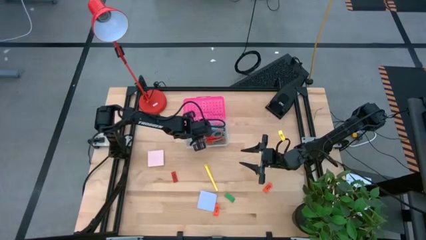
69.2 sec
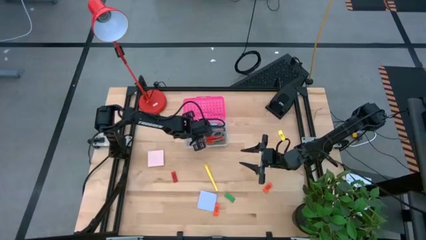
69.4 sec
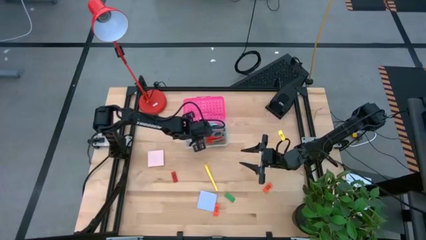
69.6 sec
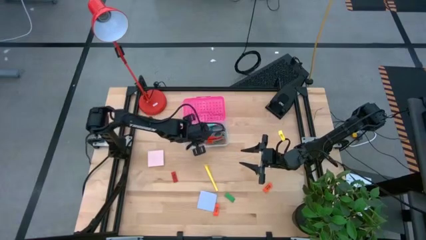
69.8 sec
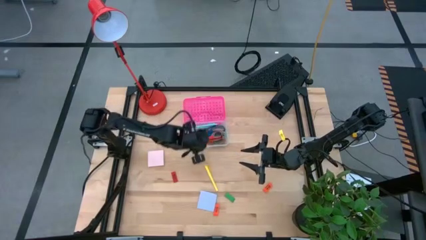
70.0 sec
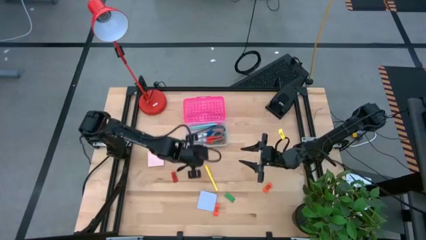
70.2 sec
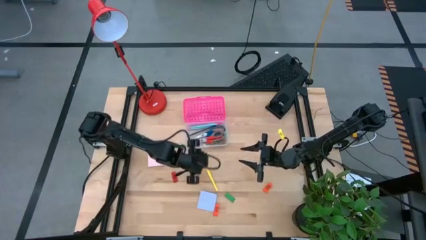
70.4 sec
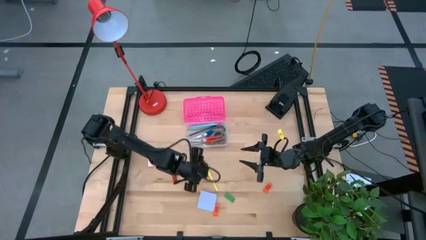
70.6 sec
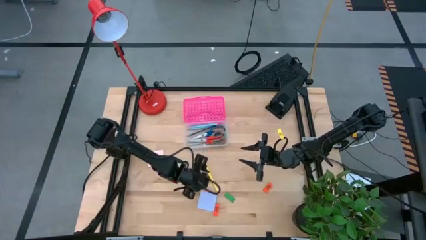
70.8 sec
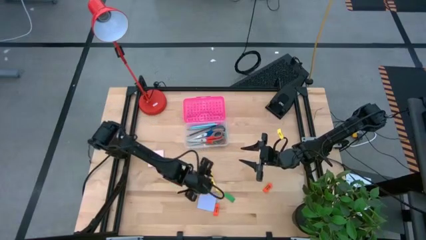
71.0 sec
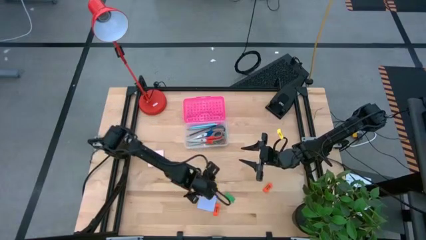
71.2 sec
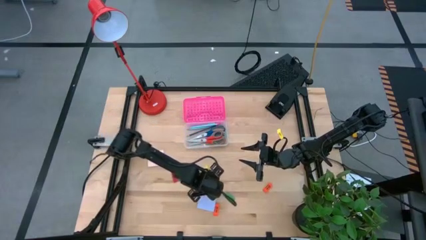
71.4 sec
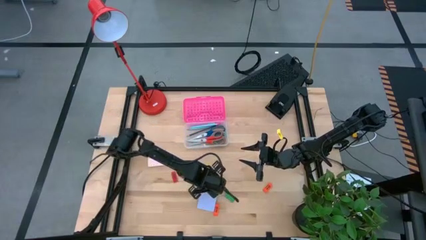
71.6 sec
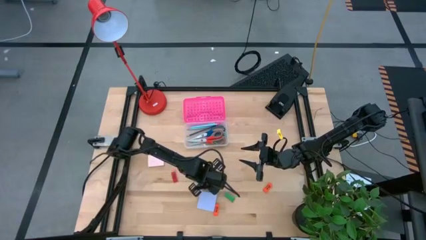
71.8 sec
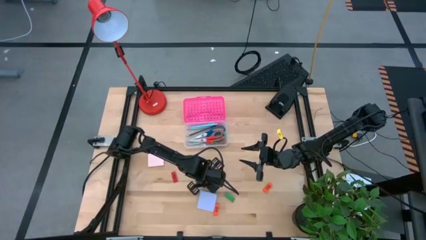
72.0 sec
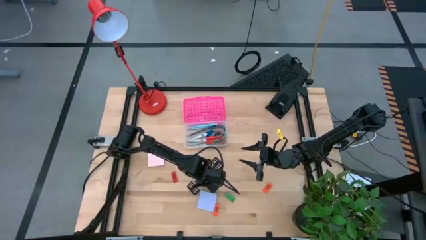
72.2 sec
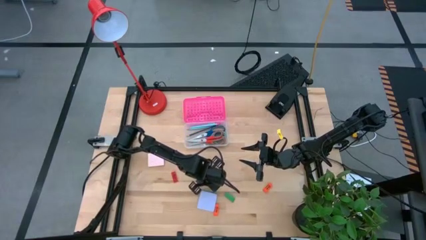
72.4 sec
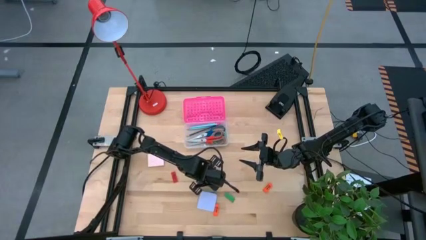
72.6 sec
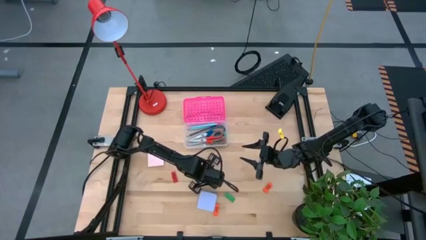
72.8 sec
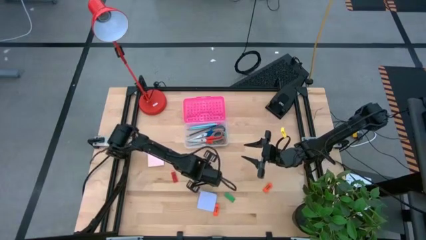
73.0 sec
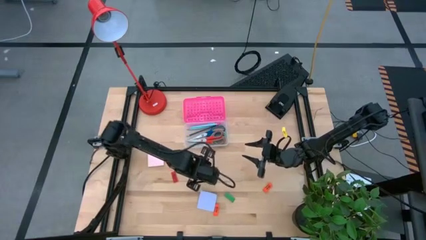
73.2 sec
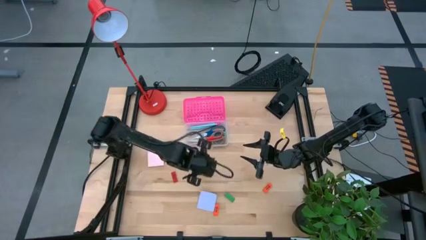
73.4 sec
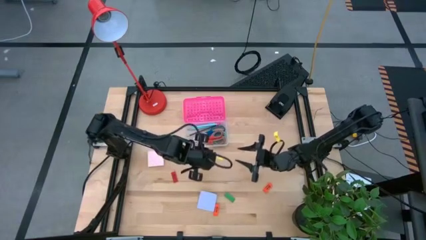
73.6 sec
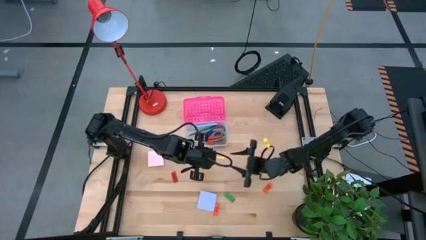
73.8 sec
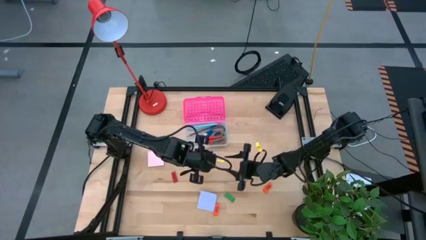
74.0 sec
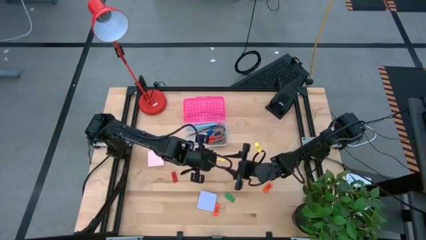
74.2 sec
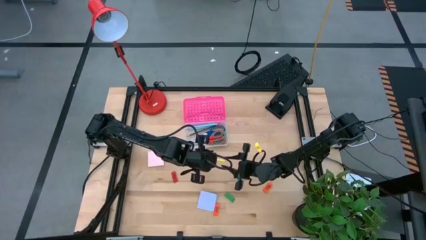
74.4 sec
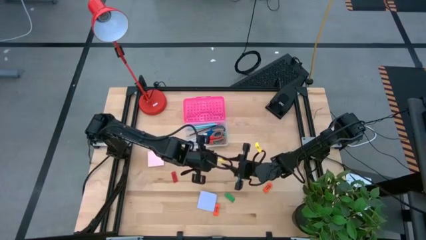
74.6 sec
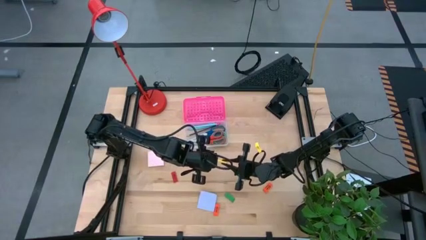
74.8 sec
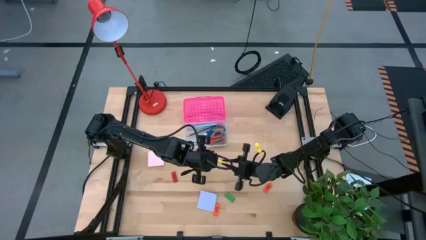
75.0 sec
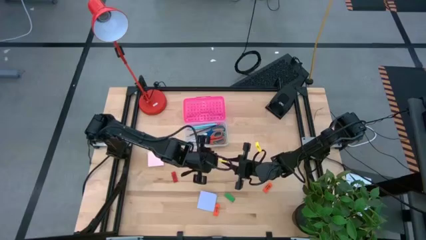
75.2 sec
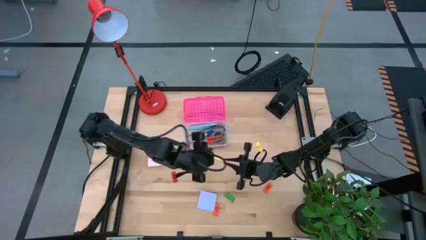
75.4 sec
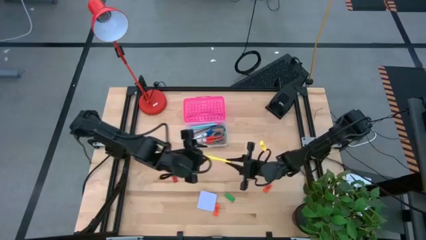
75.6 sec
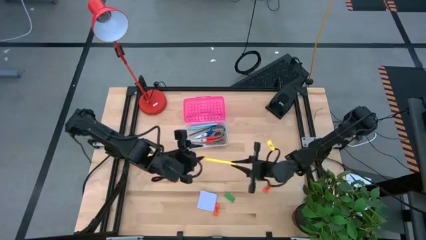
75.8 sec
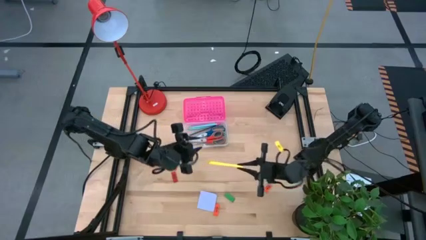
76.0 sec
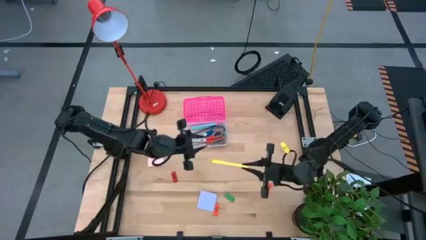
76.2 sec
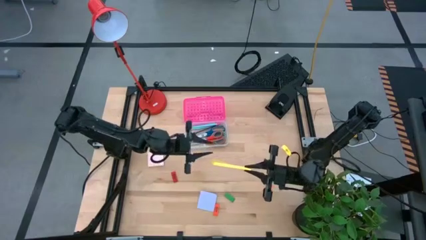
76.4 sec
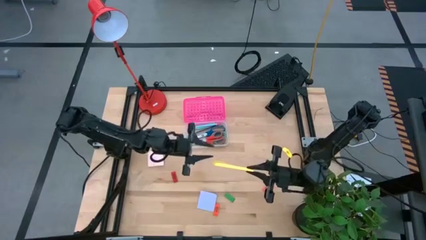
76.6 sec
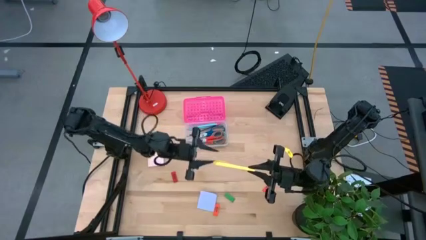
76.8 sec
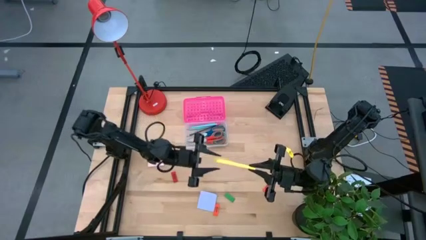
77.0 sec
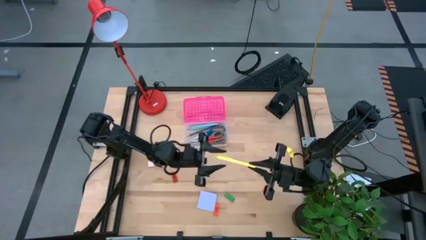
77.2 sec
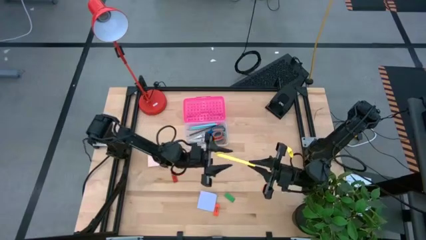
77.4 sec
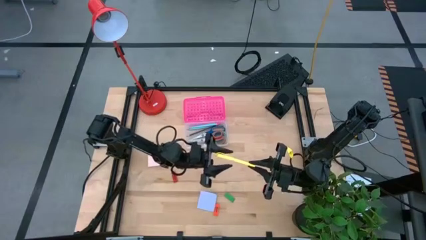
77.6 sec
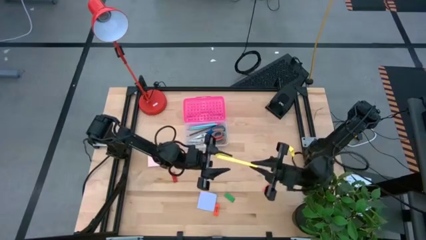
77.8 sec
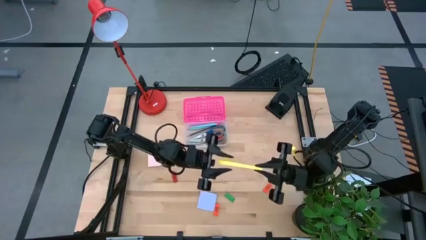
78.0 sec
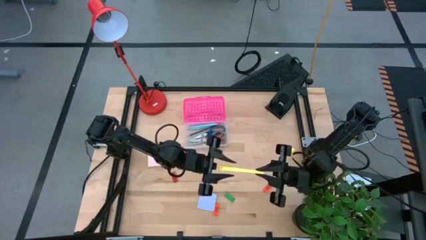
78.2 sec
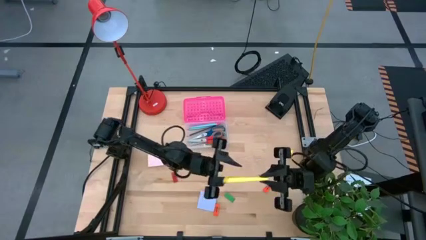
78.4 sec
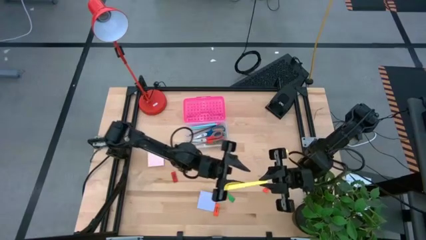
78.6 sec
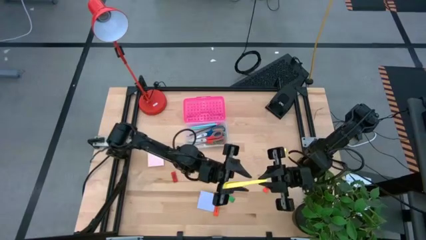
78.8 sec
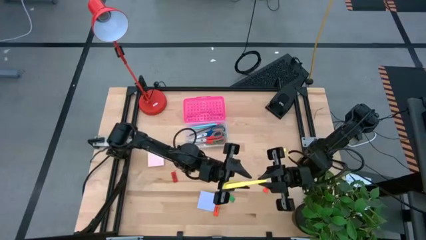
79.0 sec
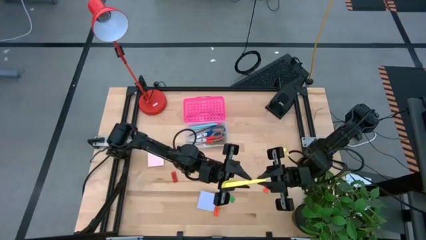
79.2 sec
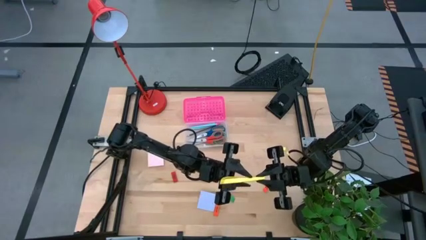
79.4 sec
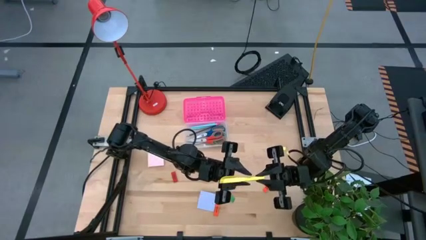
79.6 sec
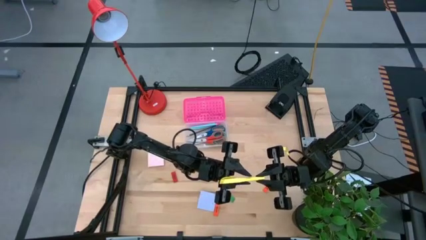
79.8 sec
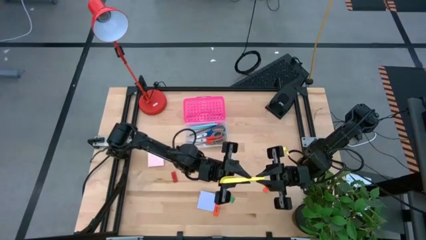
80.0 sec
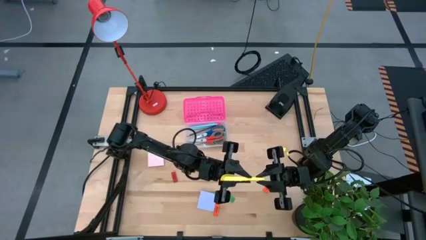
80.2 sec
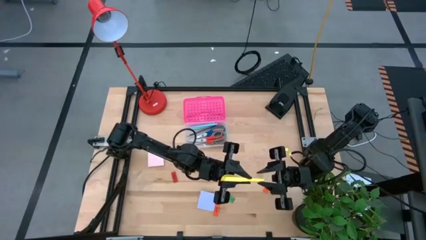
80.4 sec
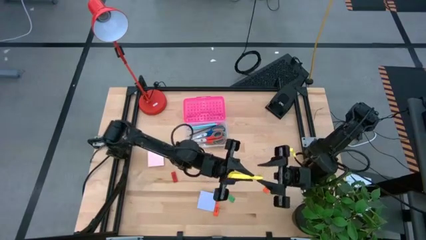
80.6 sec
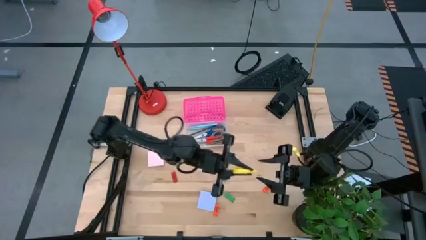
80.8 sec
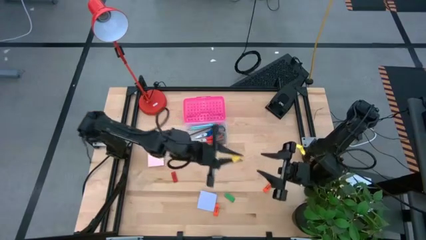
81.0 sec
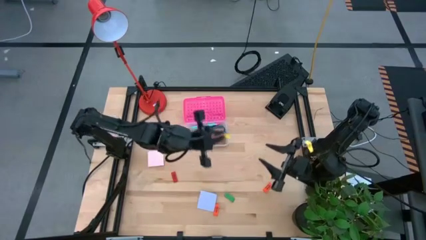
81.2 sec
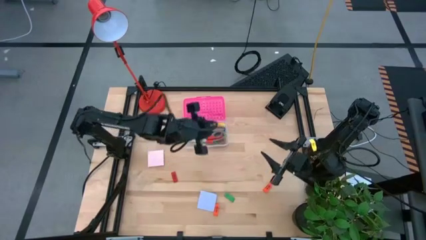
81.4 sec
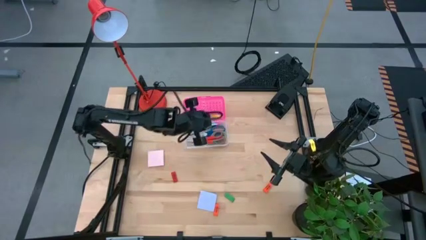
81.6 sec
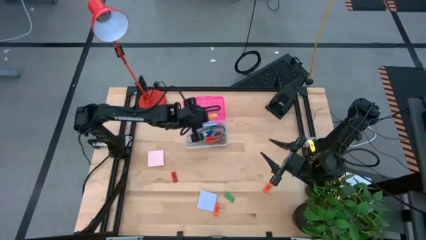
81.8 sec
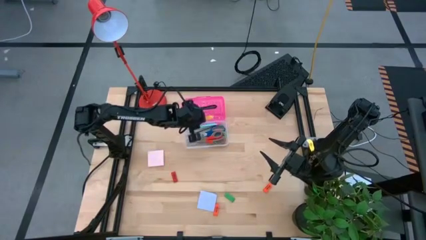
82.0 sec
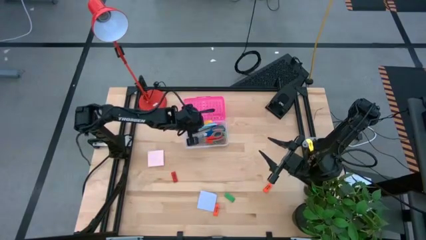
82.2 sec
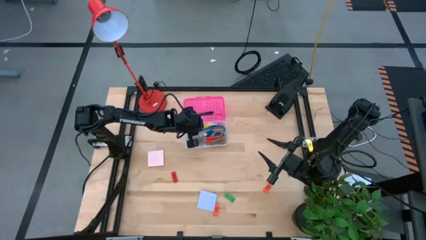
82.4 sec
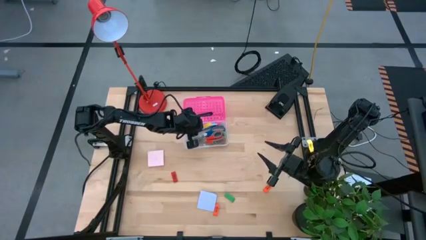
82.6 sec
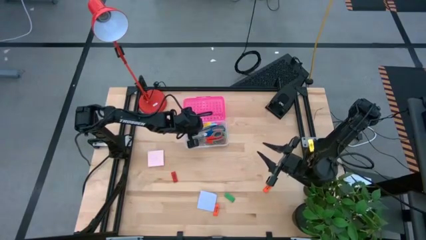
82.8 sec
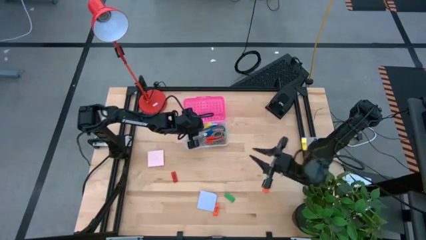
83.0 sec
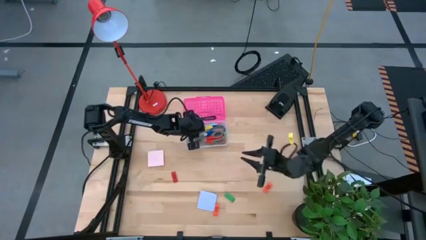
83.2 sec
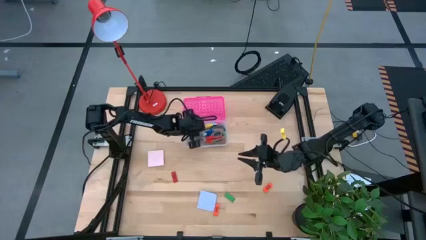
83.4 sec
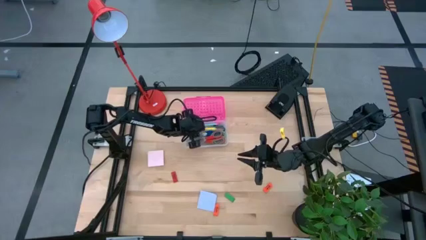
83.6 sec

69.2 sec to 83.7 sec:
Task: Pack school essentials
Put the yellow pen into the pink supply box

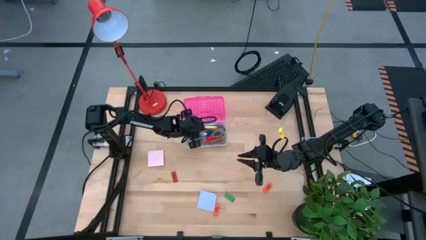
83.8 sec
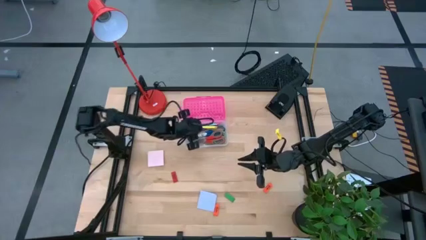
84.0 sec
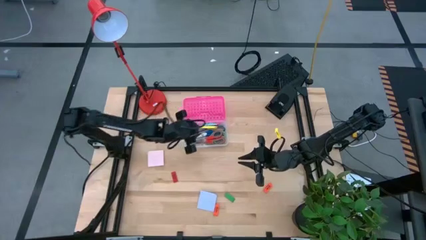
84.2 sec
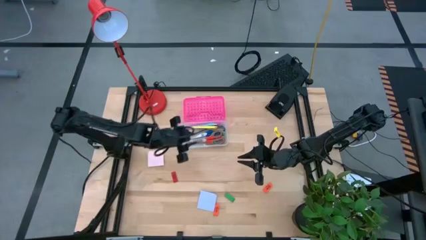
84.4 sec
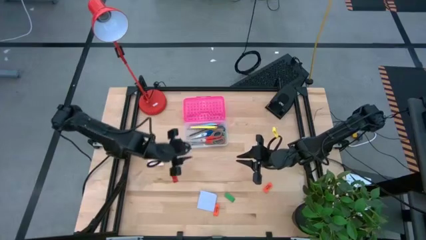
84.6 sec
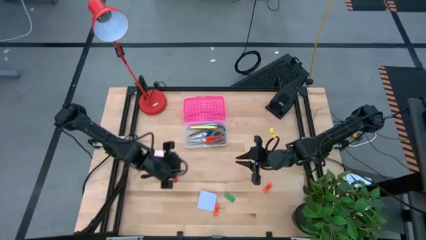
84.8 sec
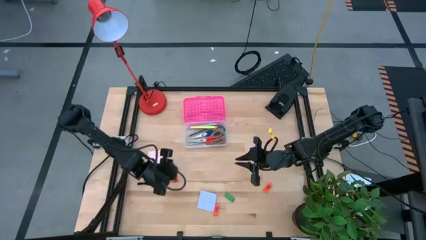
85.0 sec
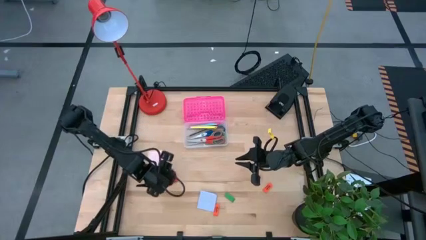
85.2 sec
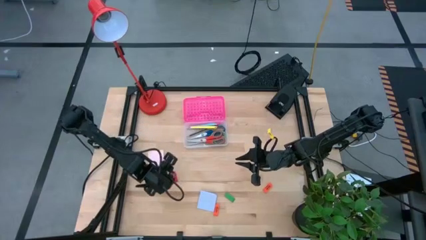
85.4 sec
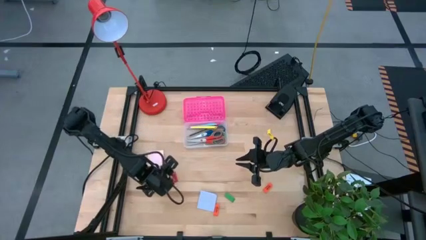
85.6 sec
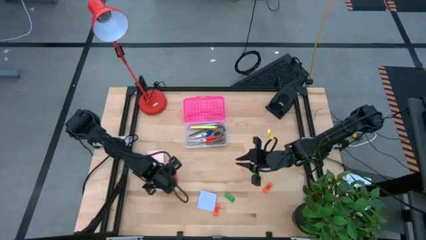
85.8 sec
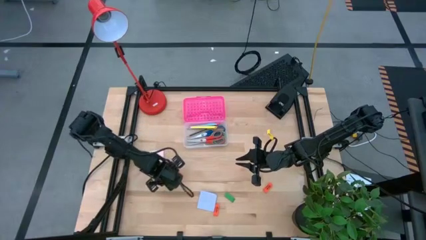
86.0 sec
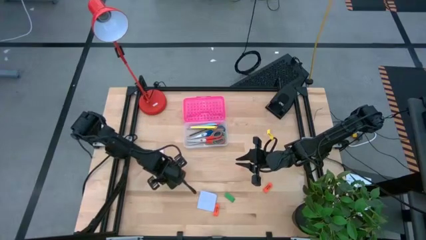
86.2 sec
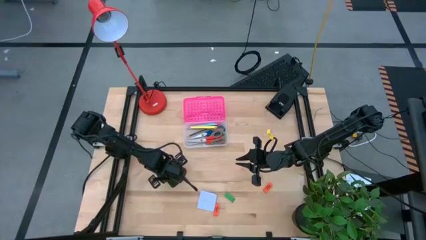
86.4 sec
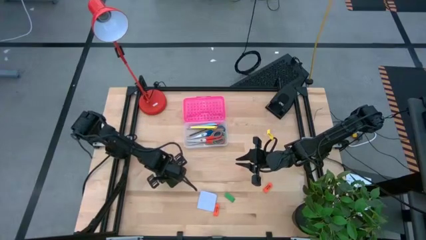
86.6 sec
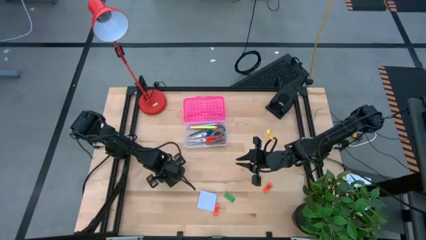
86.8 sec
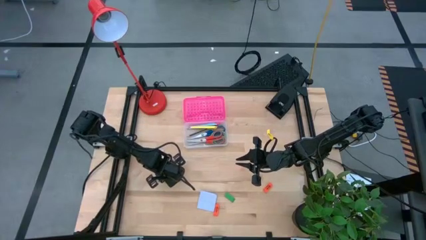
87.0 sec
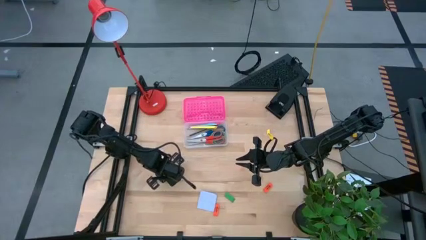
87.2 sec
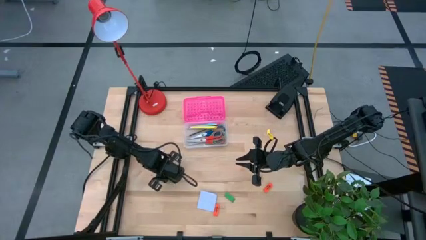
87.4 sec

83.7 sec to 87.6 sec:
Put the red eraser into the pink supply box
